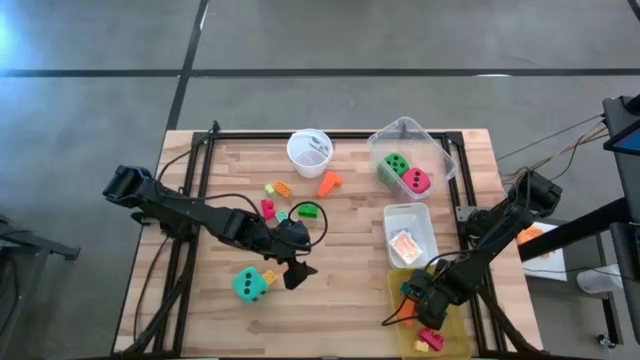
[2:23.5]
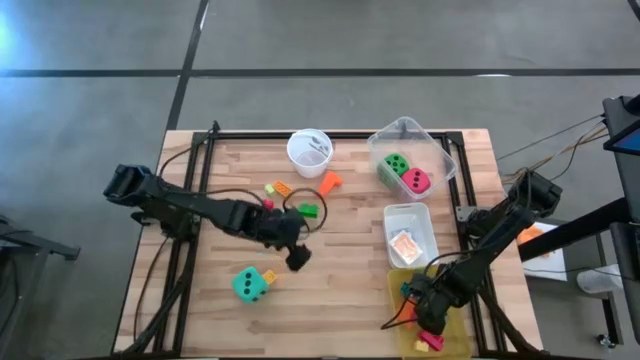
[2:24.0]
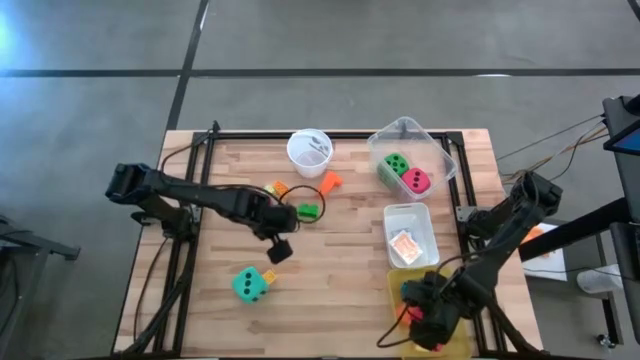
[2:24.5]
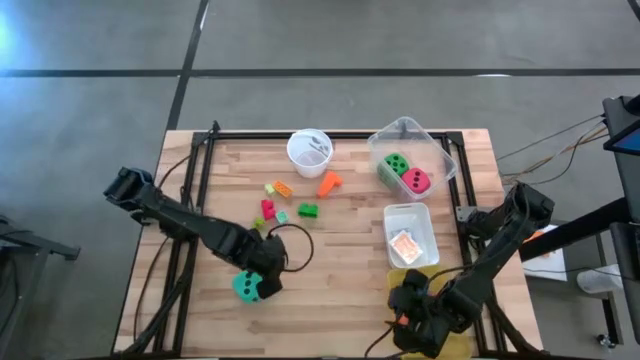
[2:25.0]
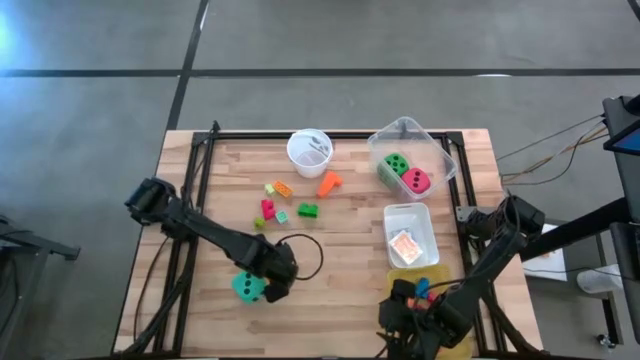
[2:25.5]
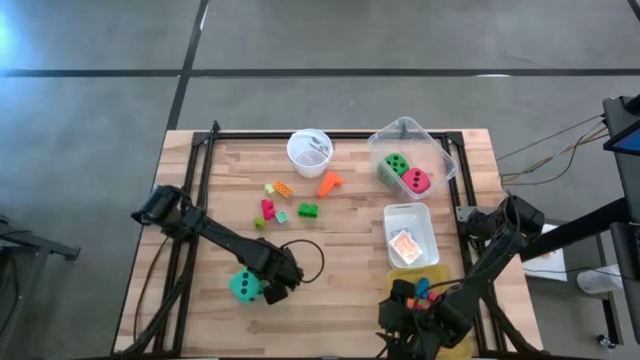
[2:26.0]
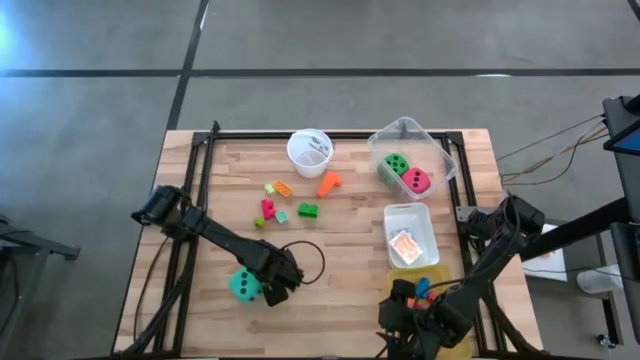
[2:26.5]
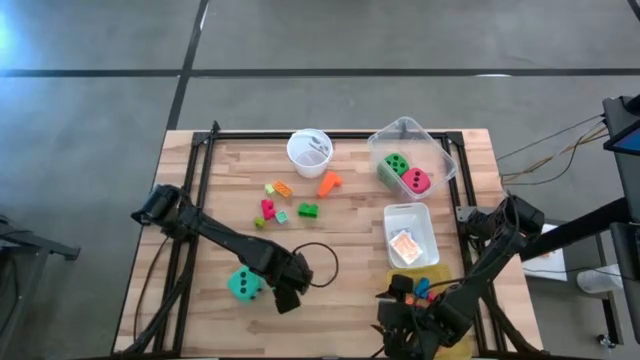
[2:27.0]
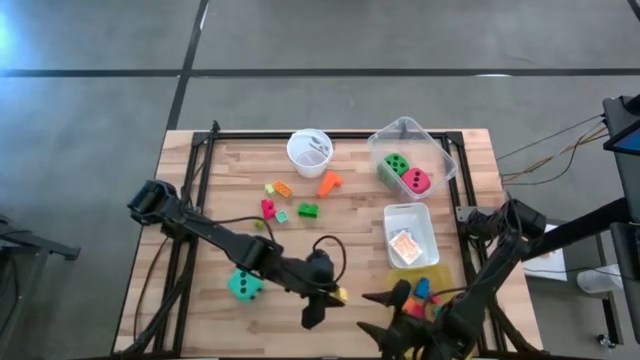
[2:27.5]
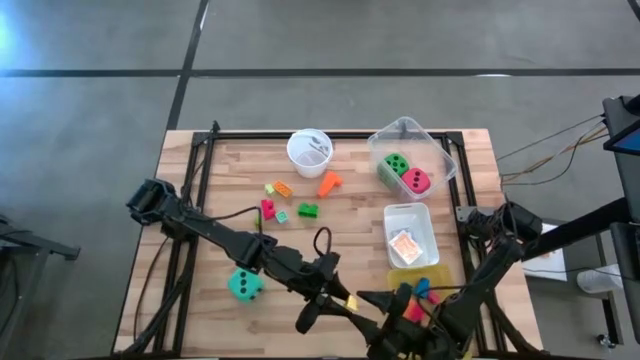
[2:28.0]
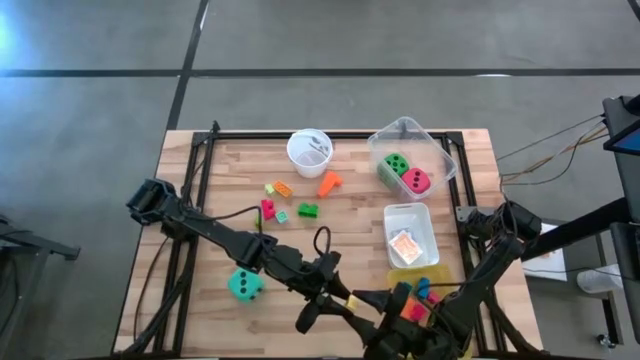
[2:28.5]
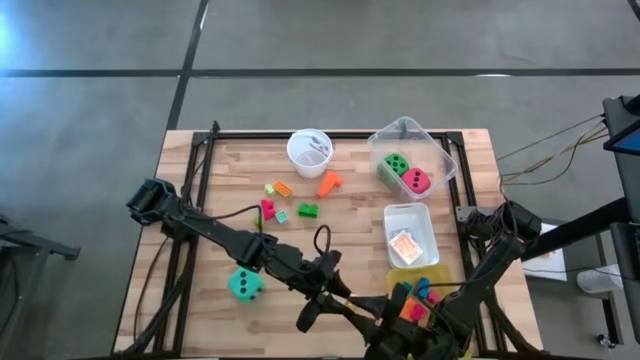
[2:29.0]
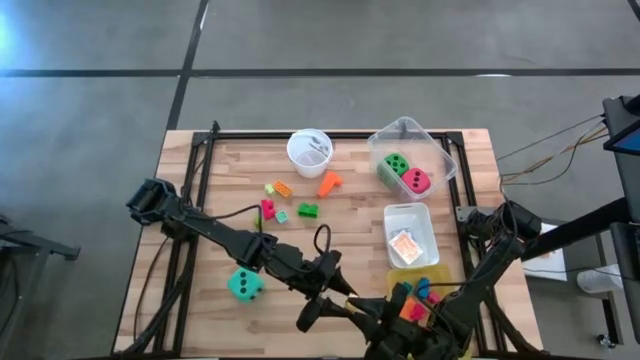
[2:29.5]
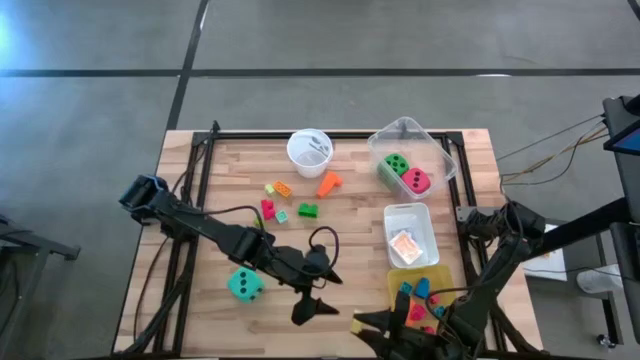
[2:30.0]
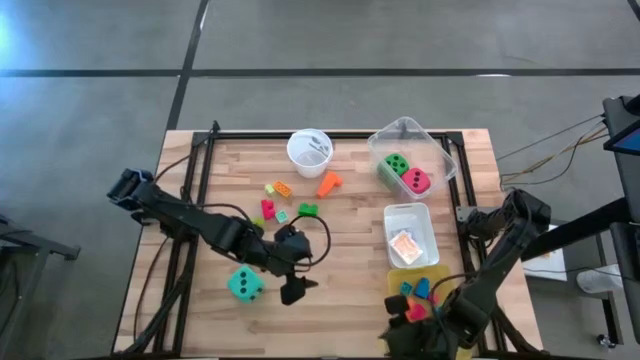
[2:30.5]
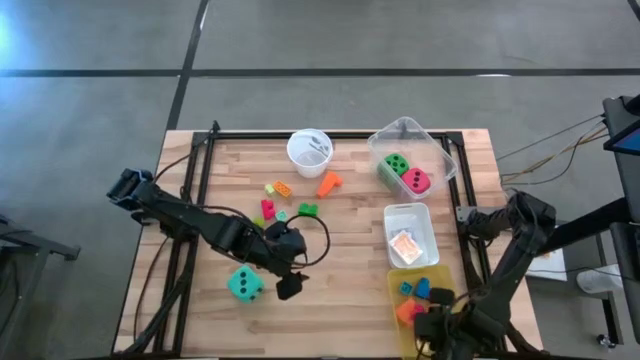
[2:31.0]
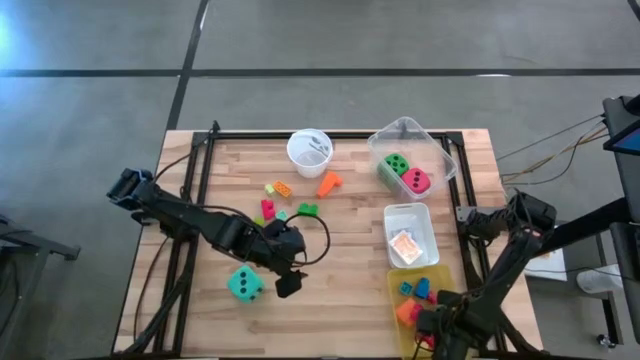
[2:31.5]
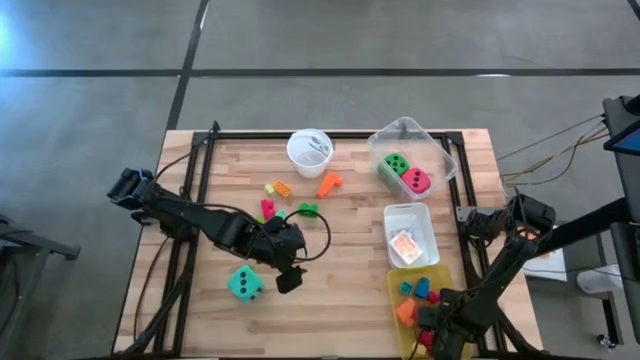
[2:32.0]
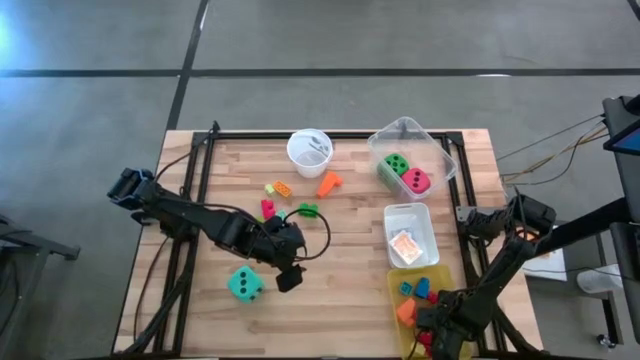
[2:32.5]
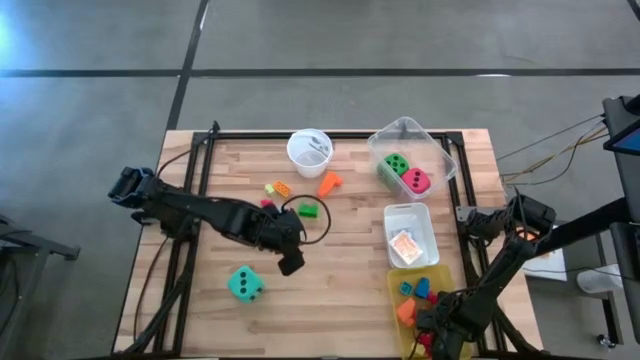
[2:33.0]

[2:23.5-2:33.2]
Task: Pick & Place Toys
Put the yellow game piece into the yellow bin

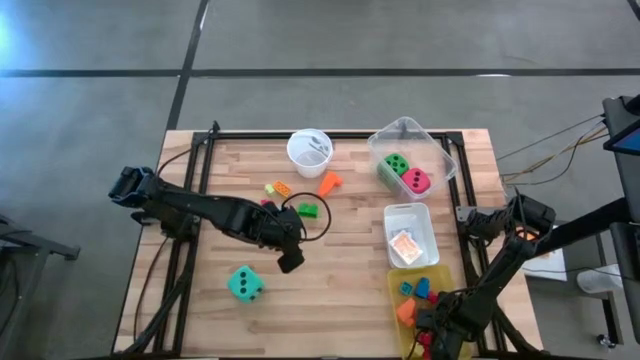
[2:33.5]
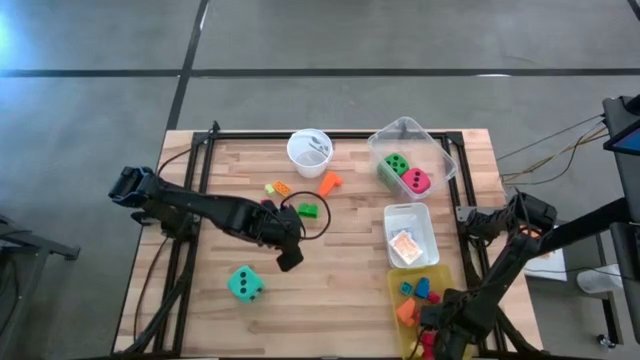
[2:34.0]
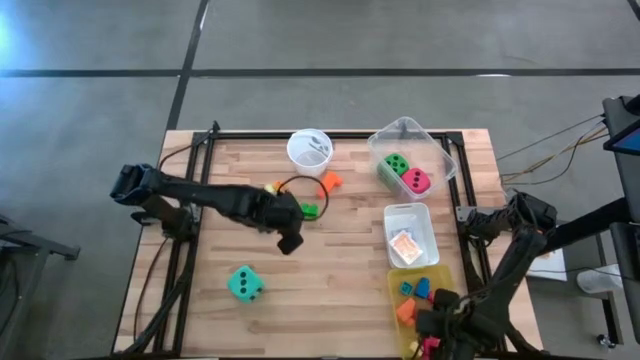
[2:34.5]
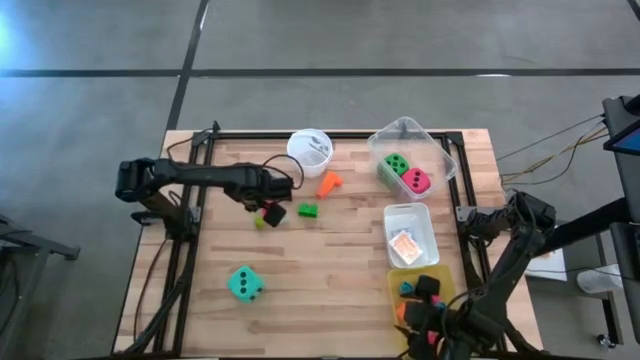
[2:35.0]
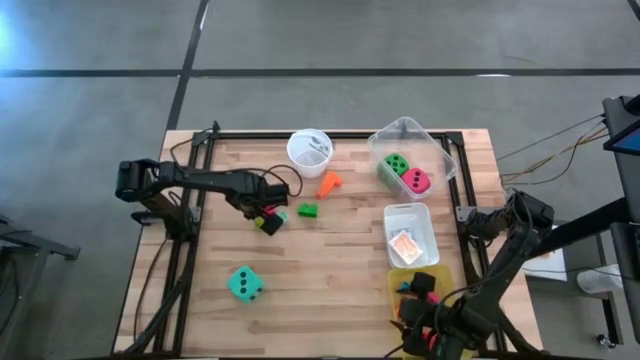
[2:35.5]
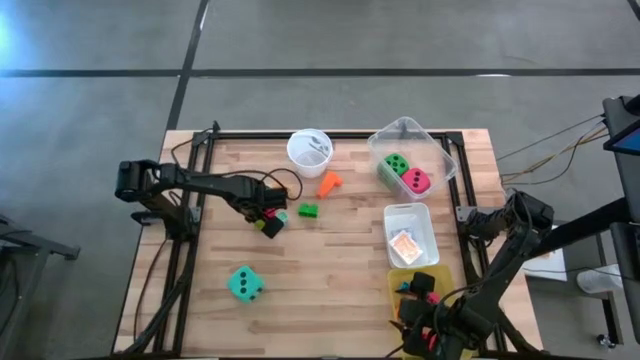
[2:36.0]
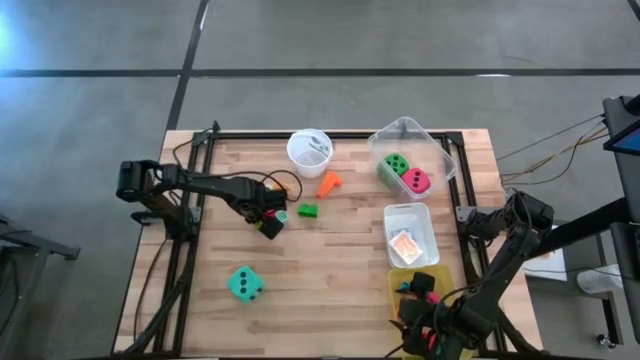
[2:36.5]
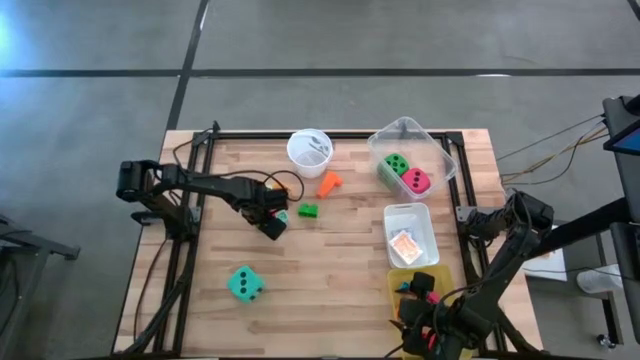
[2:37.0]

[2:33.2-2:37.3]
Put the green game piece into the yellow bin

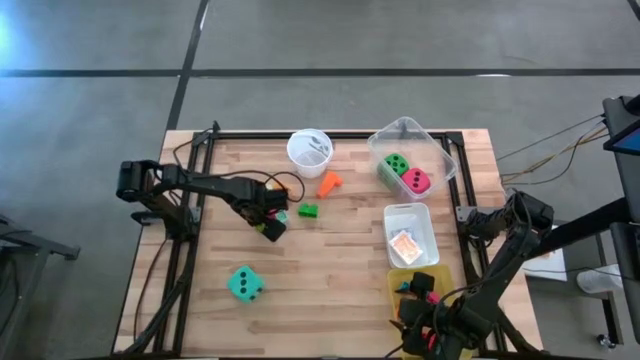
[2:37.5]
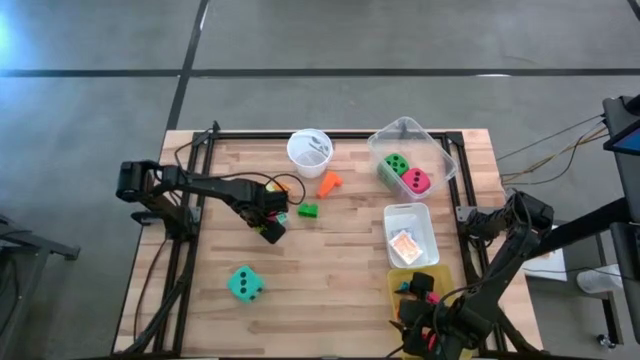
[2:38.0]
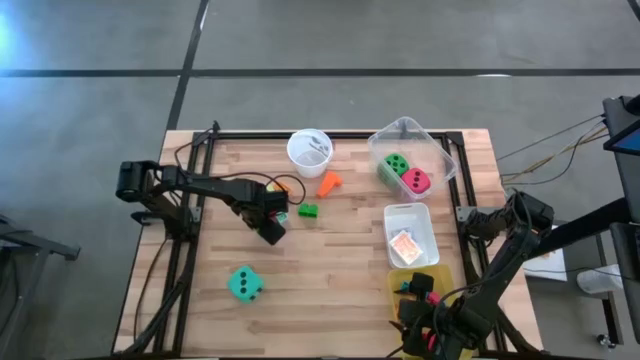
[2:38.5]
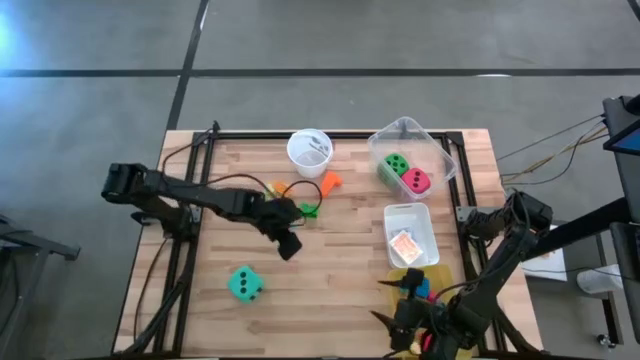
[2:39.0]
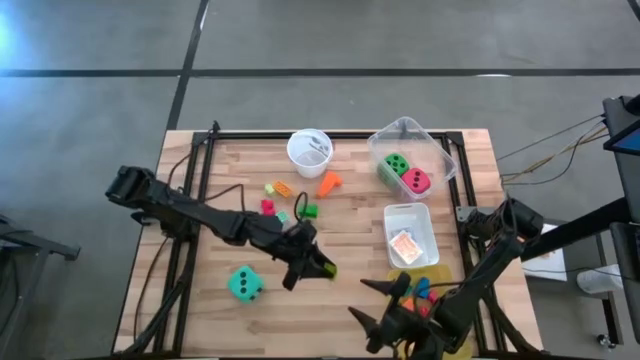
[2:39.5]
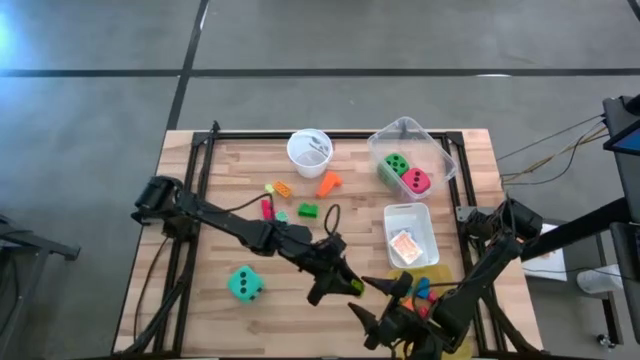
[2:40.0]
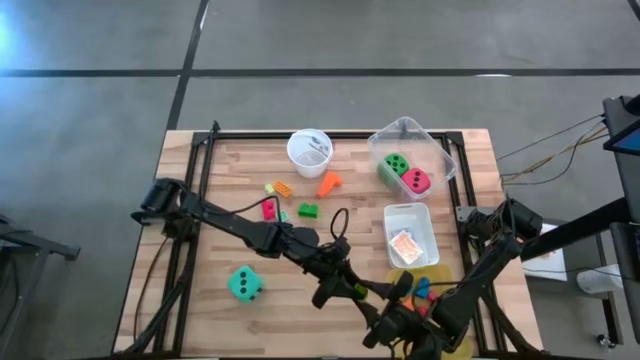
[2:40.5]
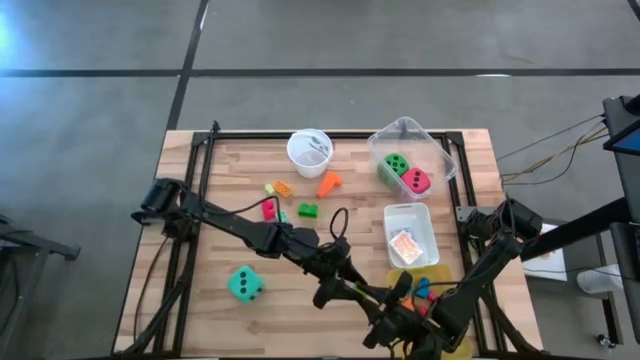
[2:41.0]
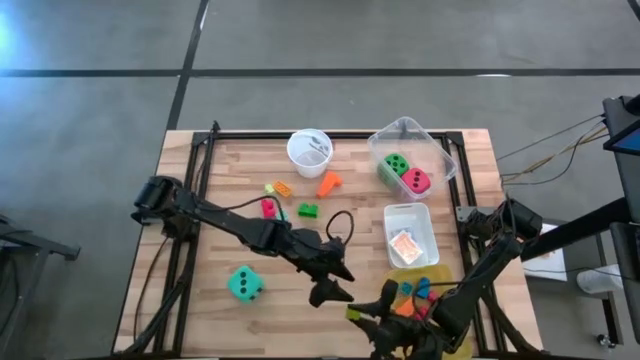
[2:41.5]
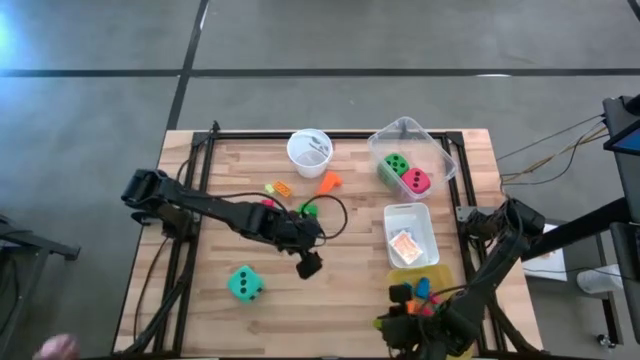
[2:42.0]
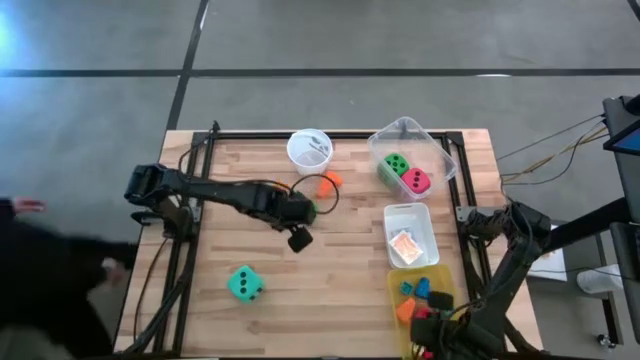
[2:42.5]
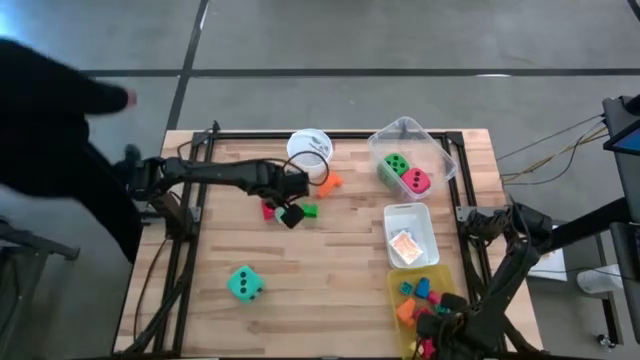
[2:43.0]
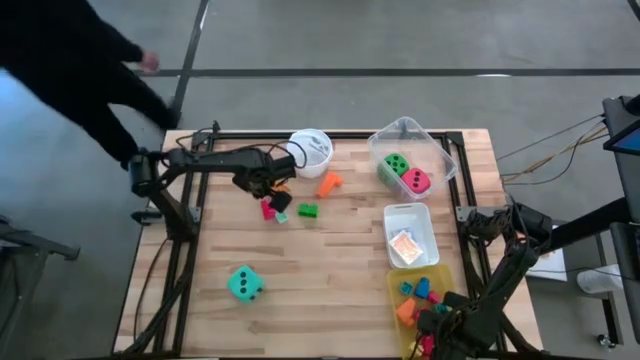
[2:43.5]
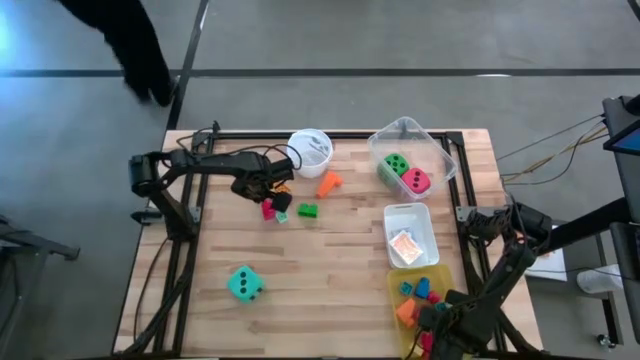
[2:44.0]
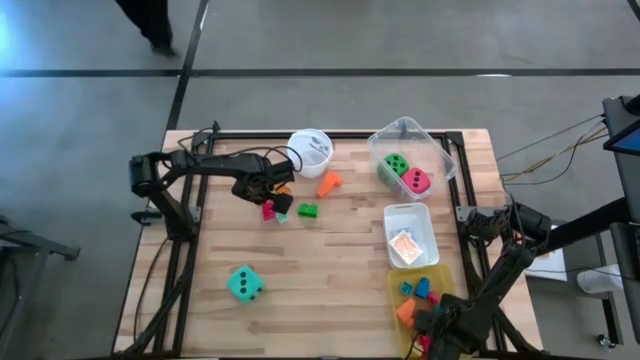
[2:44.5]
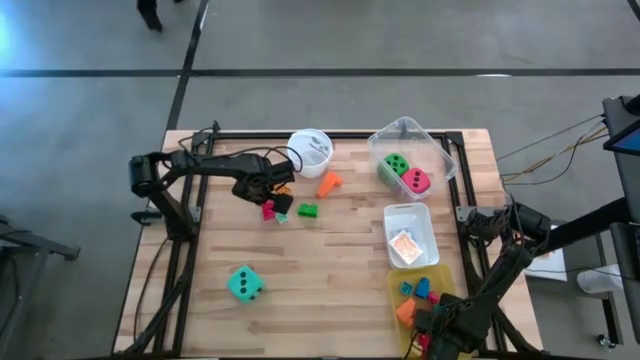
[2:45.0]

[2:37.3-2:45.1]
Put the green game piece into the yellow bin
